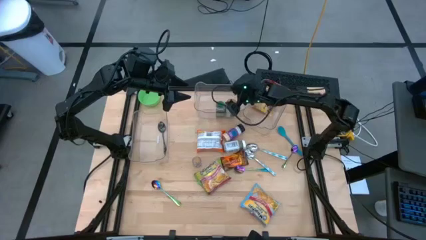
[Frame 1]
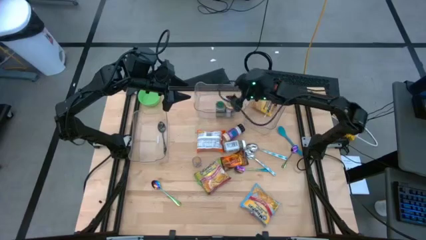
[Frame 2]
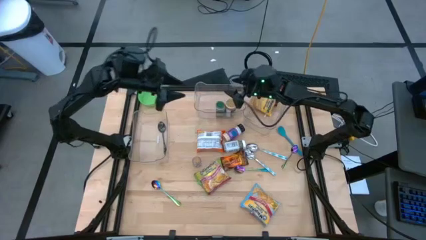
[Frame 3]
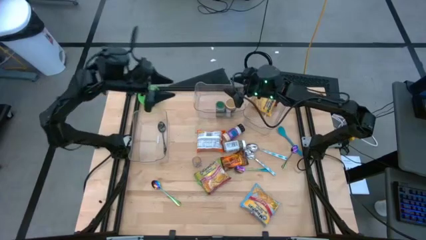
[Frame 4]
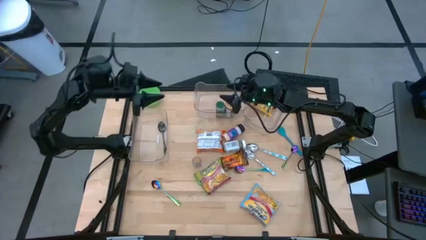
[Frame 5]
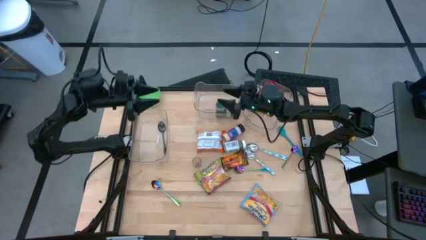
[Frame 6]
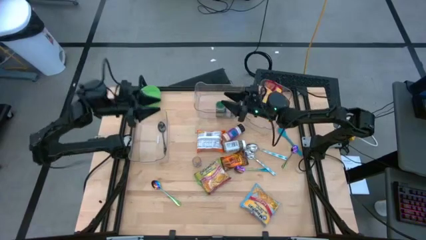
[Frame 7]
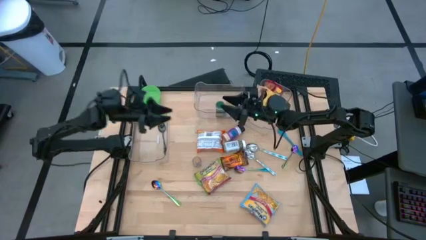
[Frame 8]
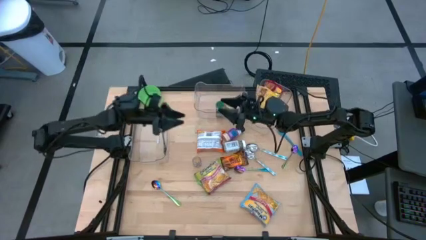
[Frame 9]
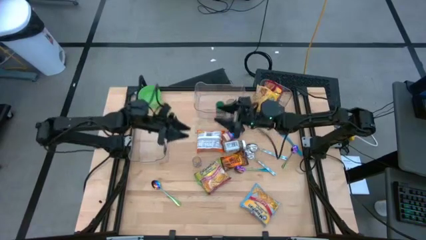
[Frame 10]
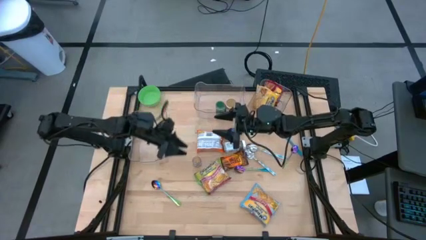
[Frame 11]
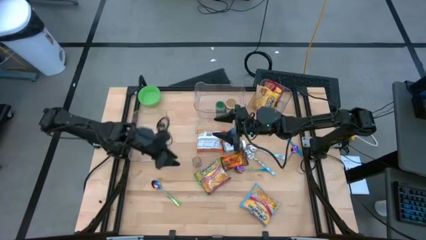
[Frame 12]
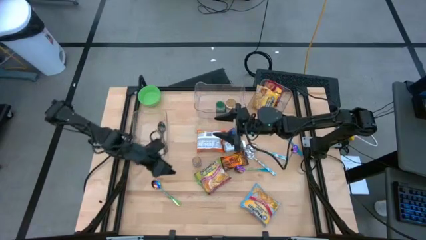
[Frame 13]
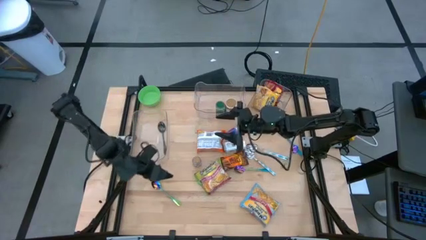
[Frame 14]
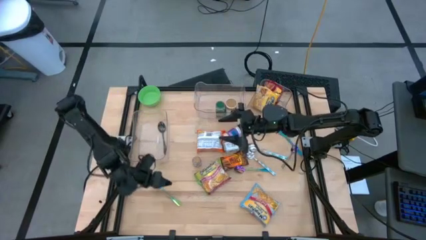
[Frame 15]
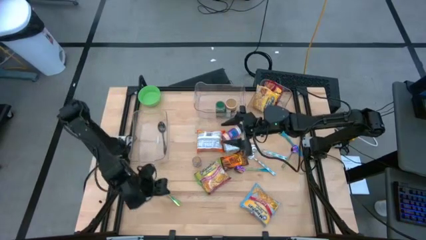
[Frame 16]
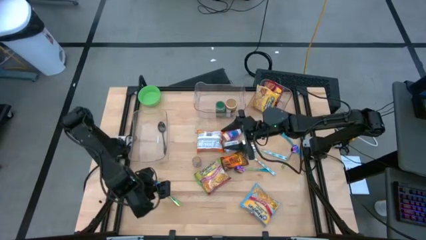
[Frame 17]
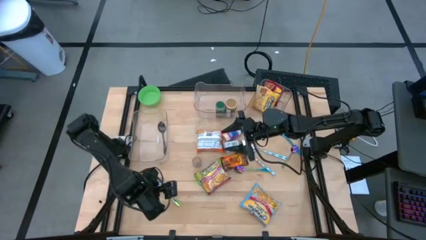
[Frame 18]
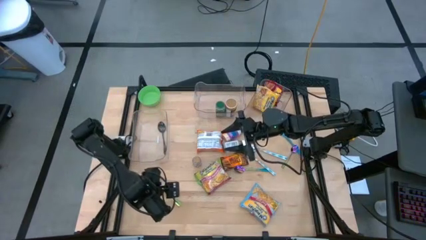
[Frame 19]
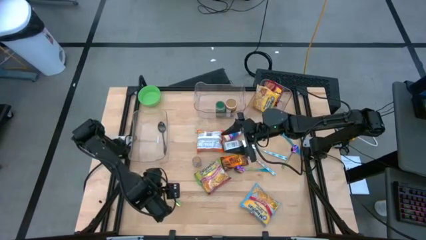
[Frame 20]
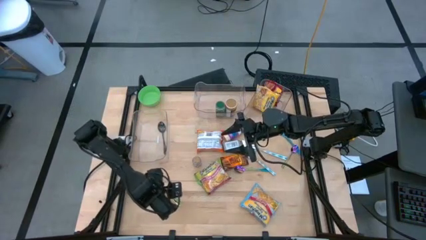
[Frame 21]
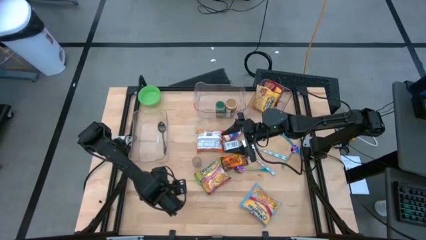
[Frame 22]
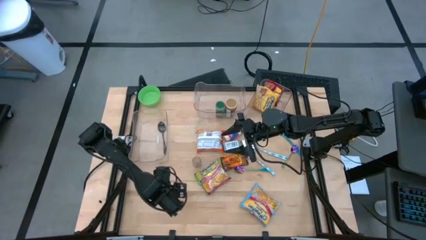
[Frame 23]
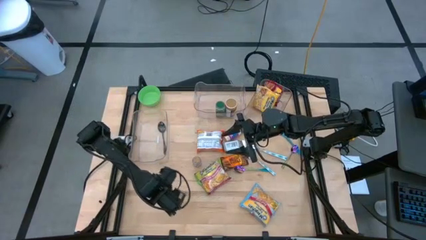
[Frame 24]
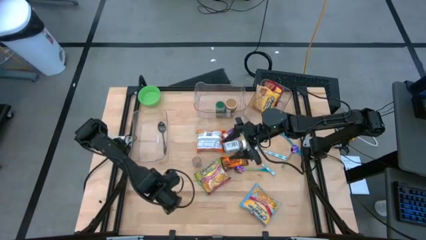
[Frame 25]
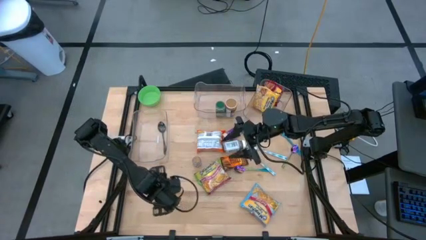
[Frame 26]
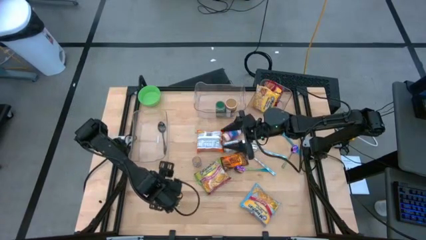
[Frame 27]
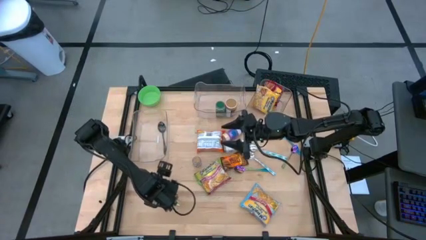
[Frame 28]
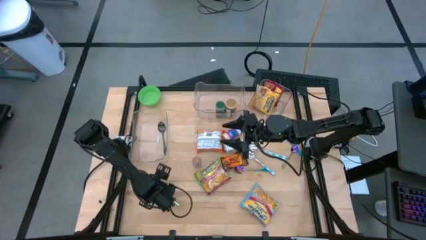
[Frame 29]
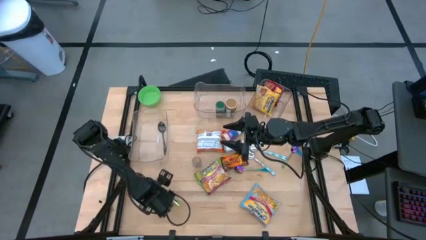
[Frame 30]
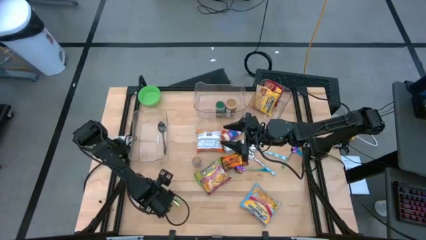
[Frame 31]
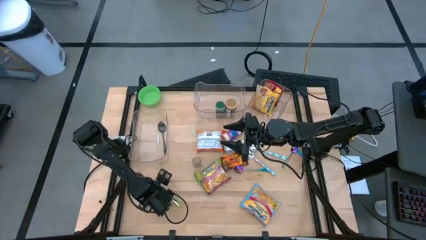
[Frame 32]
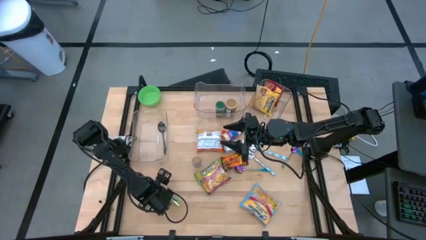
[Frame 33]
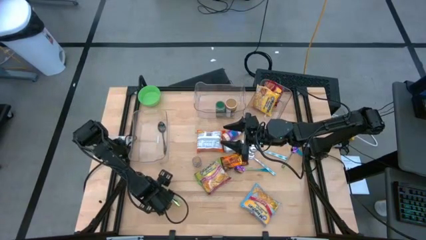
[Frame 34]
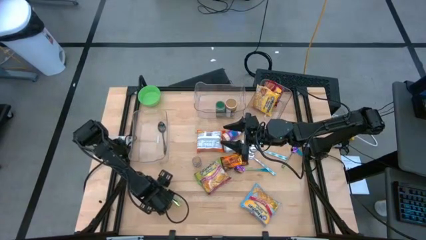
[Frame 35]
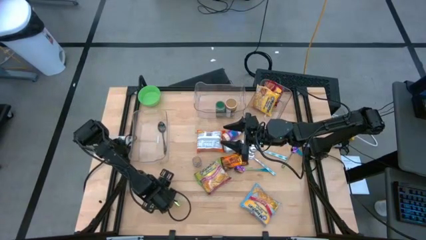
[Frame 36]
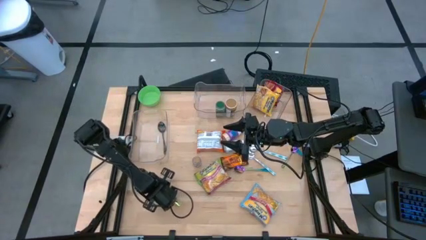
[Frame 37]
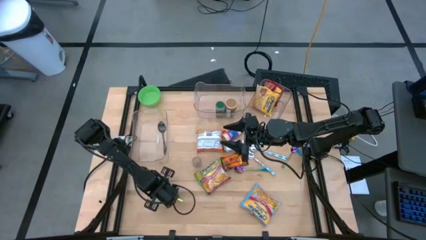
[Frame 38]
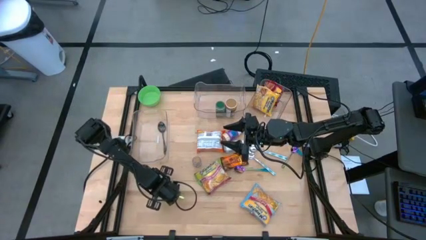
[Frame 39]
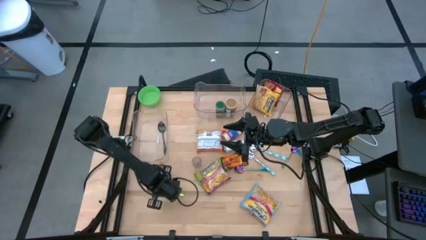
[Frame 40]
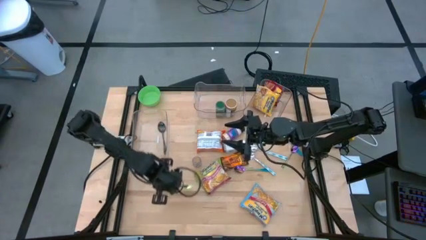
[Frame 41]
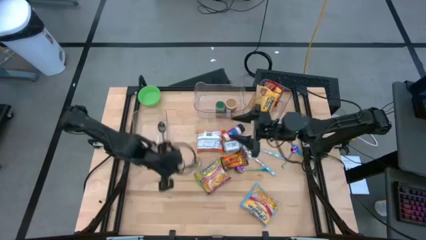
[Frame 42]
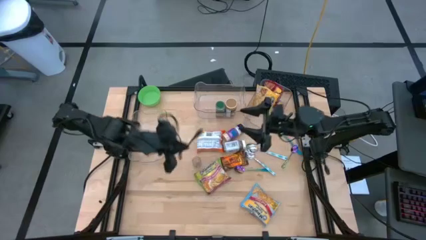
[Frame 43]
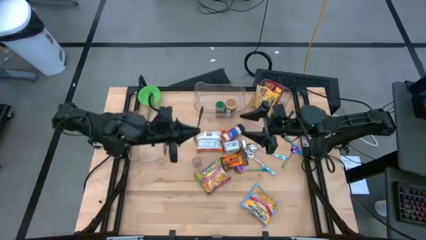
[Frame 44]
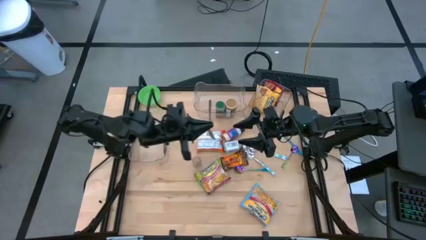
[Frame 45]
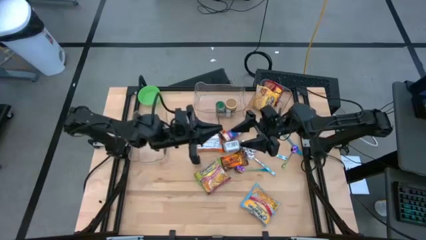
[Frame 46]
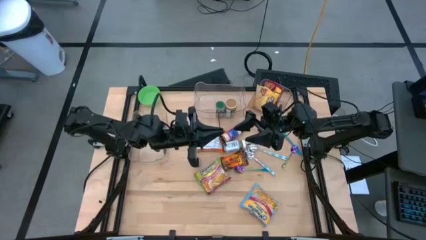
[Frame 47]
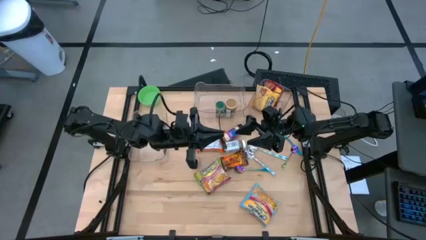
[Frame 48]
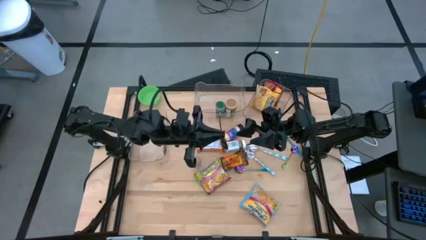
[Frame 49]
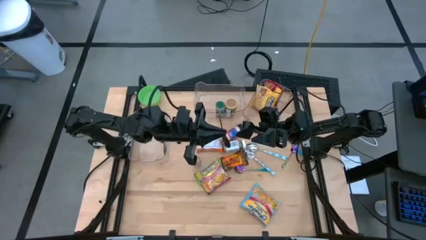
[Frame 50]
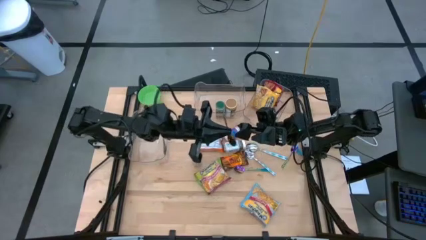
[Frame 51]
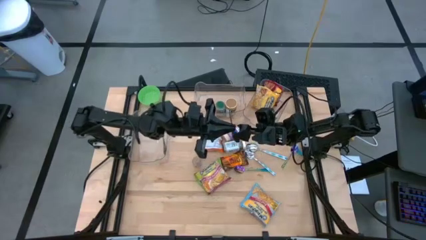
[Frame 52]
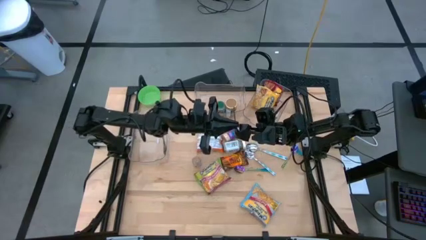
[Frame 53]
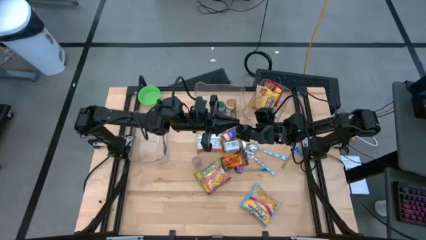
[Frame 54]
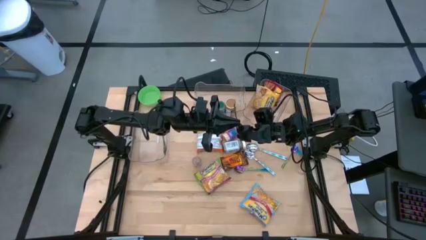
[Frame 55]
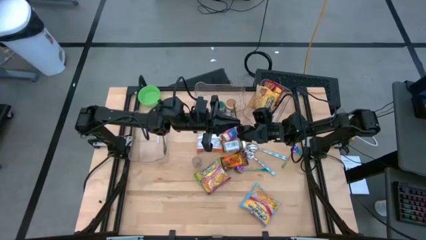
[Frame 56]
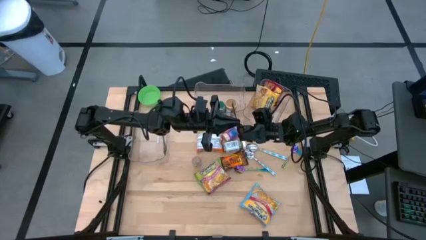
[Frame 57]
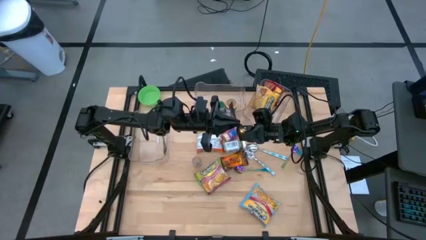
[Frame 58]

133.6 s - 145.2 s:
Task: Pick & Place Food Item
Put the left violet spoon into the left transparent bin

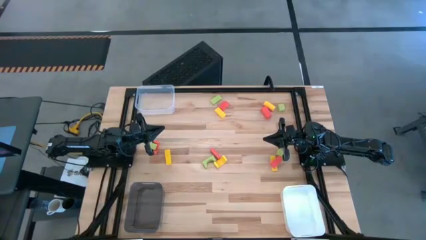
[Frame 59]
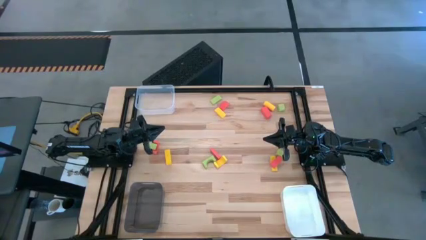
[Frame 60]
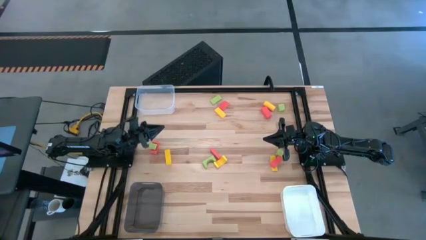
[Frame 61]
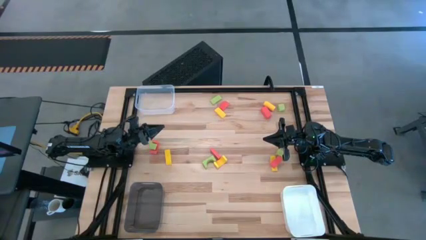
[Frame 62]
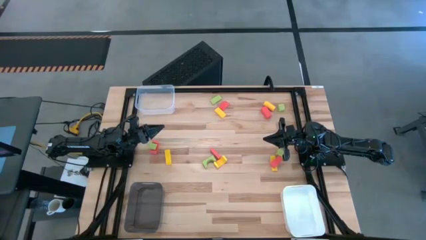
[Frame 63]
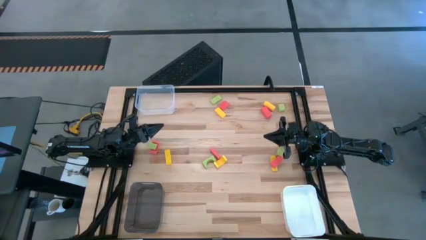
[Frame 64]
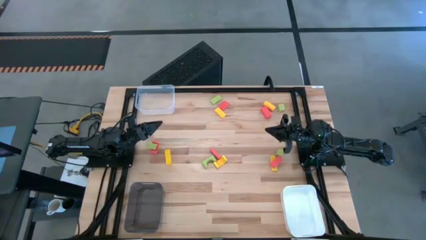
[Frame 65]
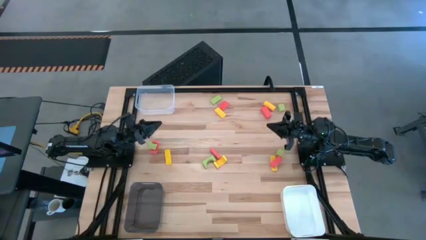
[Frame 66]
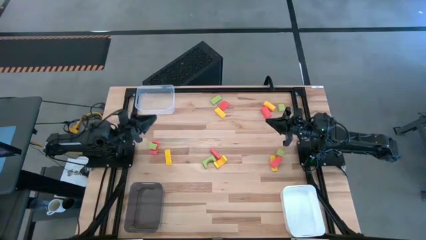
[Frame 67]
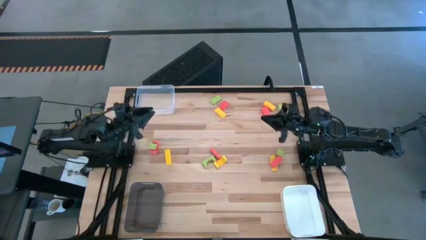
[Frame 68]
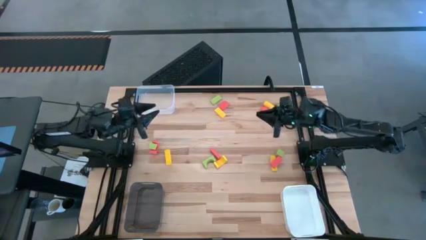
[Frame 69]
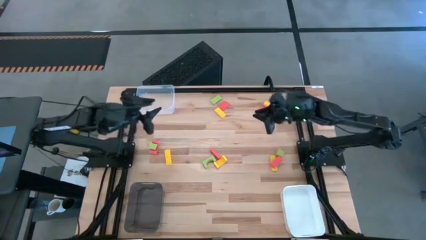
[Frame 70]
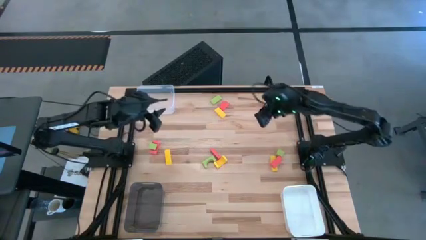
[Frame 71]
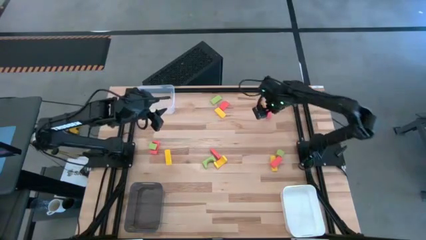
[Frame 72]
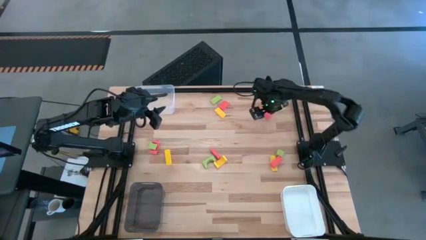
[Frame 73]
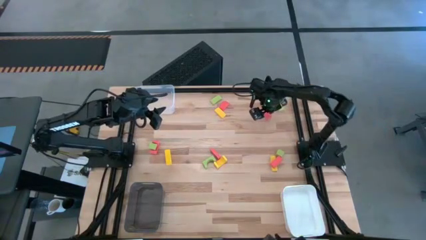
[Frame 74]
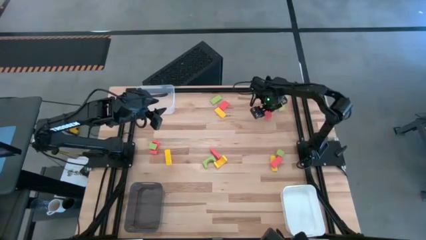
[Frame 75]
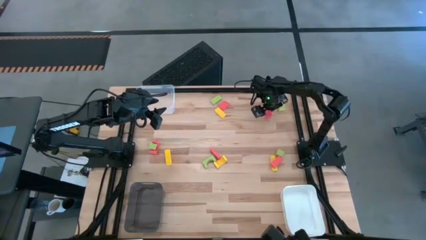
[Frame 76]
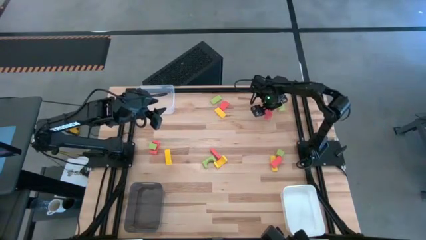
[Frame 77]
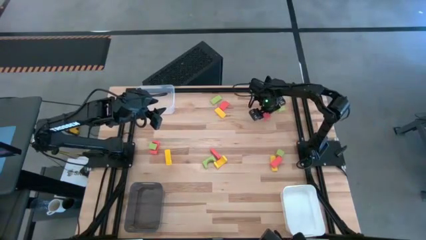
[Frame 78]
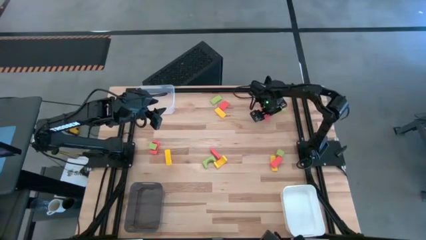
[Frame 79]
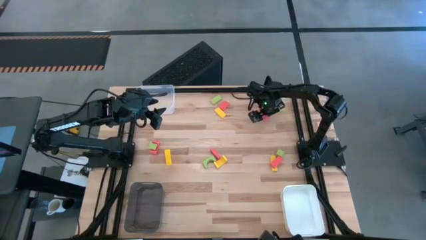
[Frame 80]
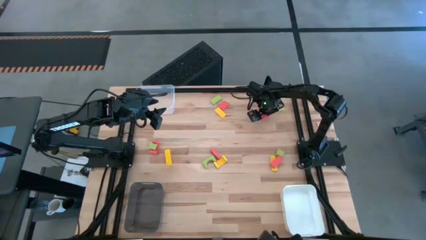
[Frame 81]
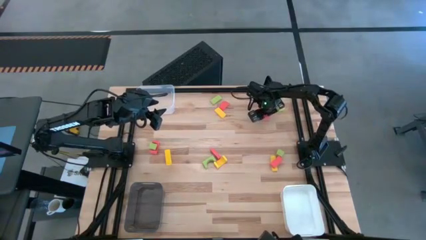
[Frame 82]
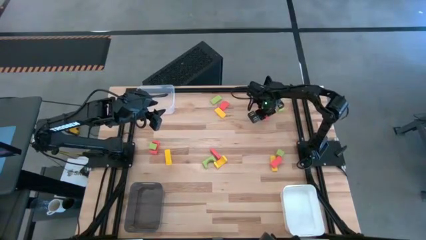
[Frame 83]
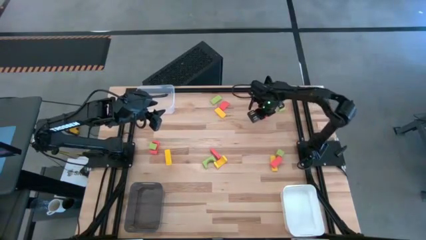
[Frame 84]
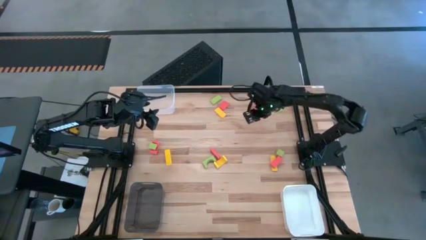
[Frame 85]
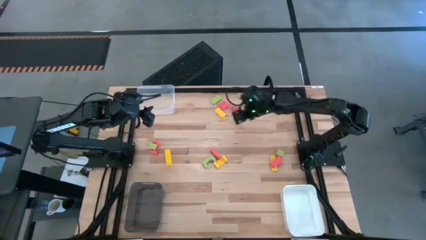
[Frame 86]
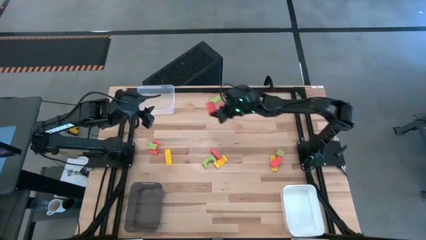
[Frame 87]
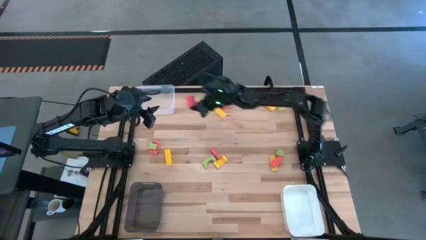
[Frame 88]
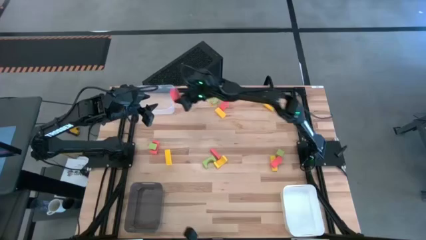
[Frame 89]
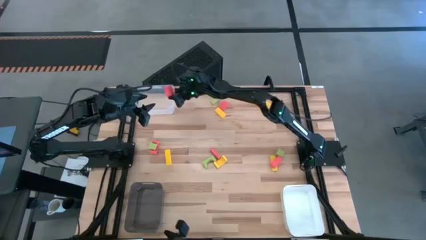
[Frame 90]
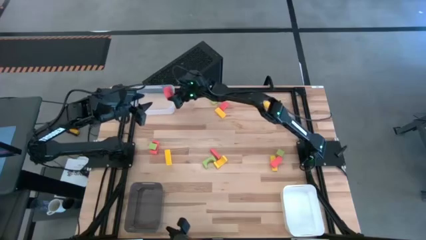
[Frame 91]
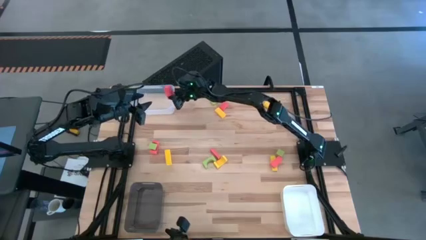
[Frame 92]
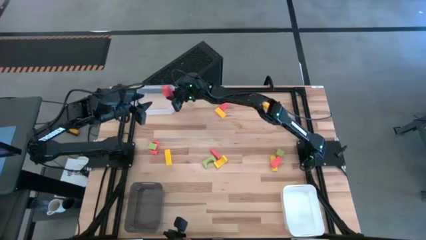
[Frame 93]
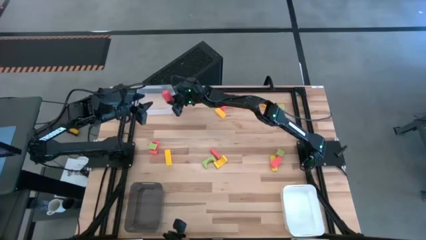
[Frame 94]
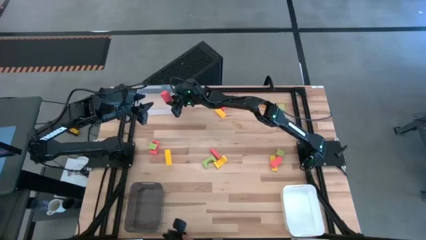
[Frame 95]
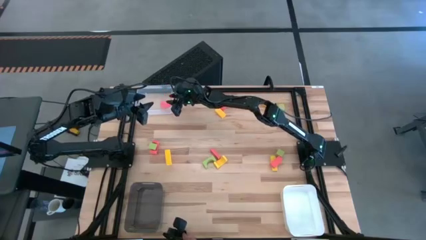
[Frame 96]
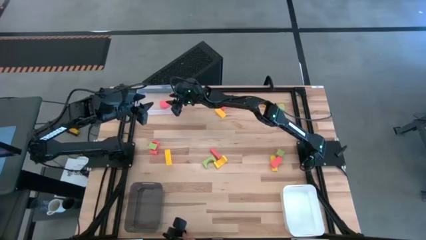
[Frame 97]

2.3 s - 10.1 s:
Task: Sort & place blocks by color
Put the orange block into the white transparent bin
